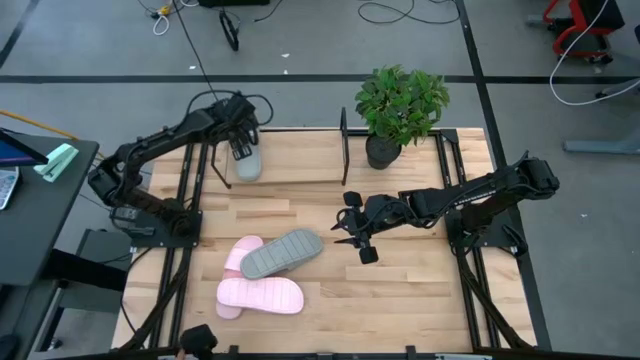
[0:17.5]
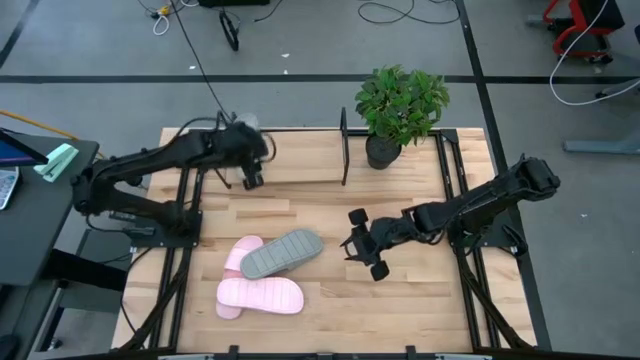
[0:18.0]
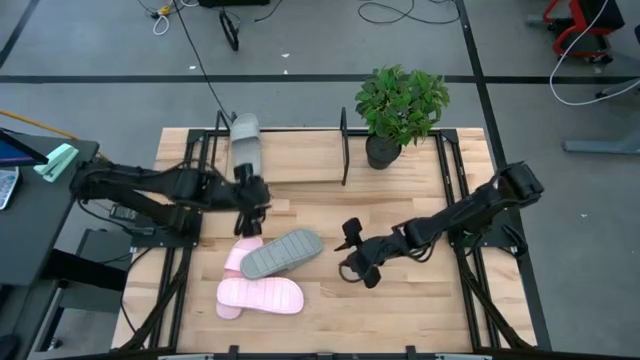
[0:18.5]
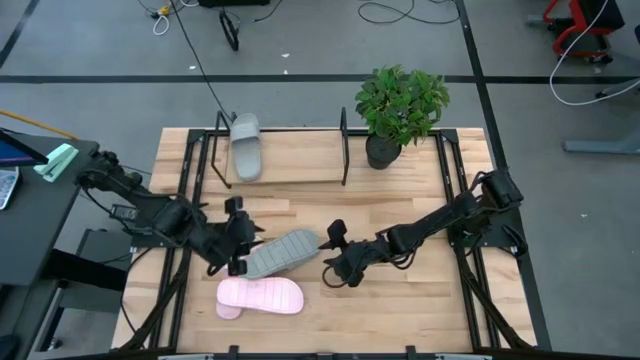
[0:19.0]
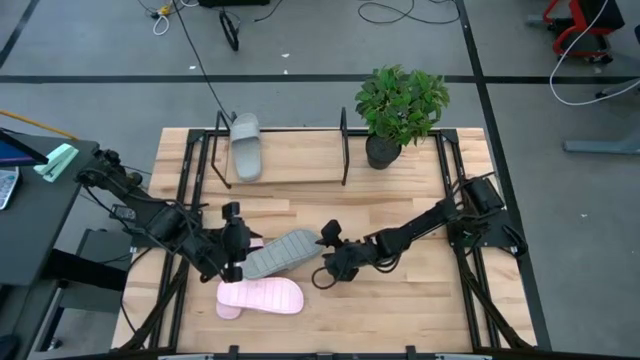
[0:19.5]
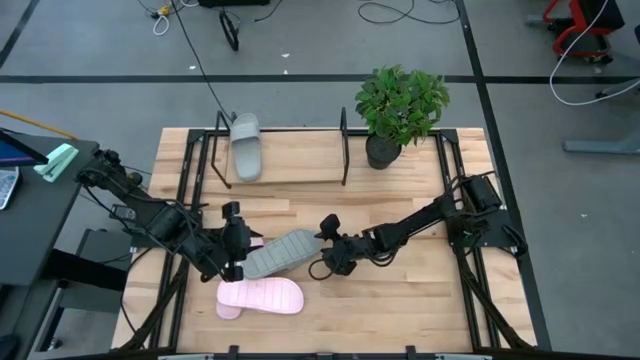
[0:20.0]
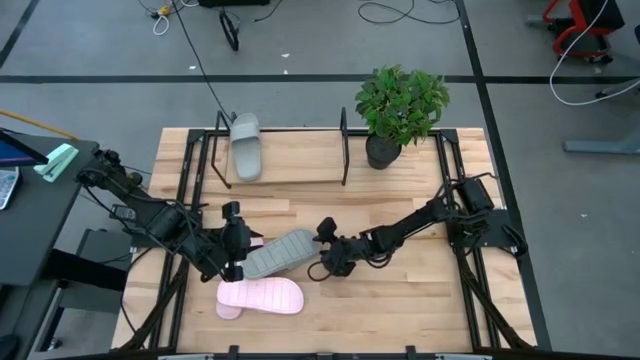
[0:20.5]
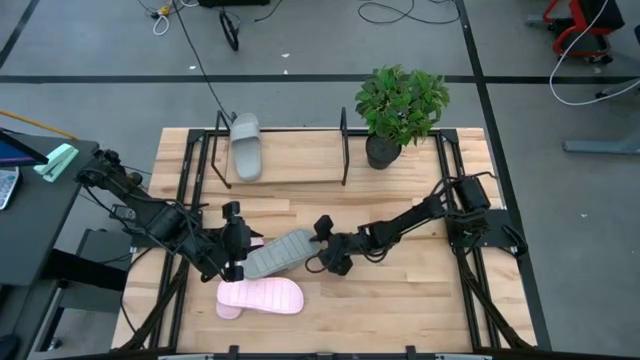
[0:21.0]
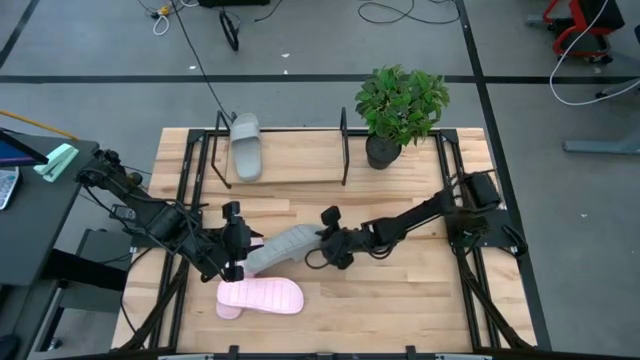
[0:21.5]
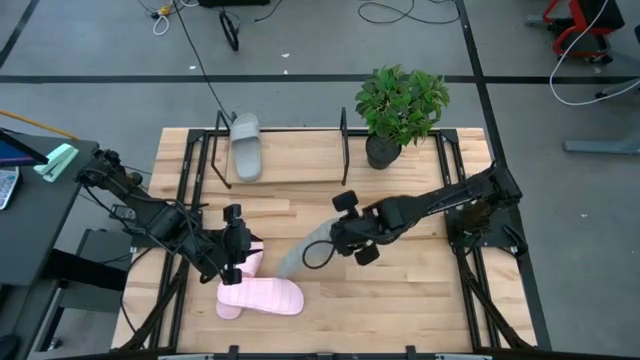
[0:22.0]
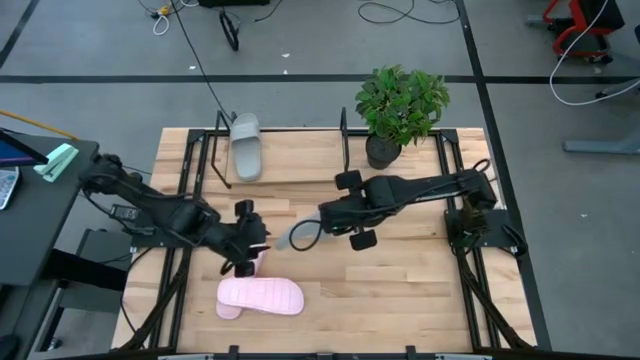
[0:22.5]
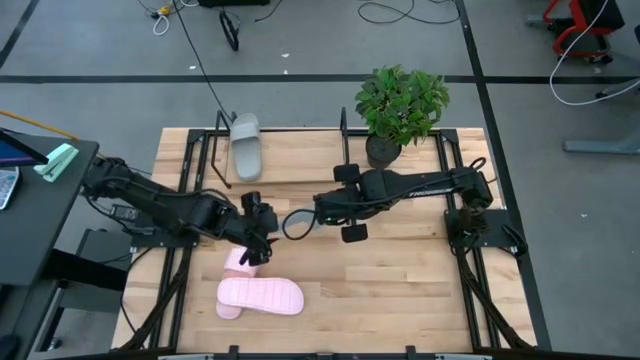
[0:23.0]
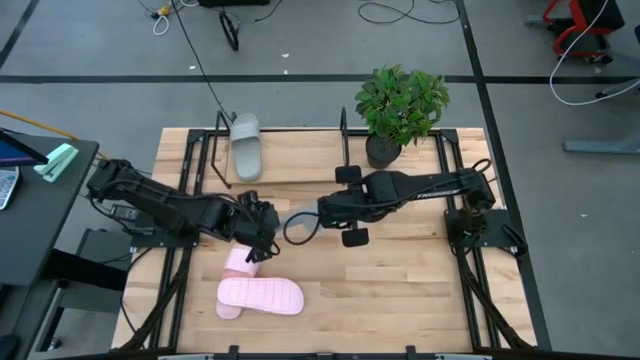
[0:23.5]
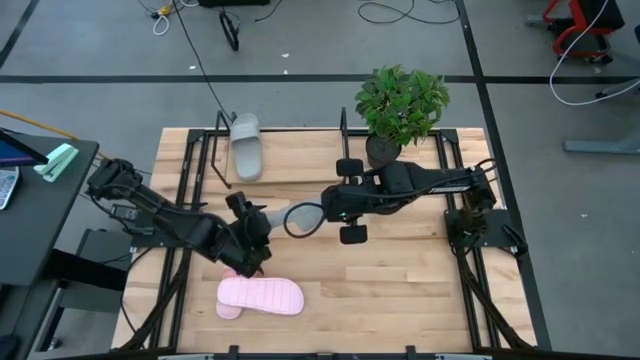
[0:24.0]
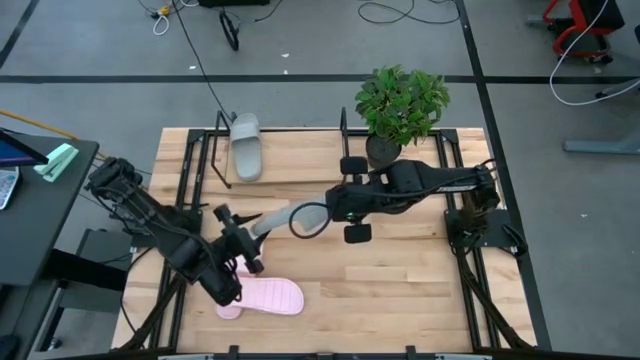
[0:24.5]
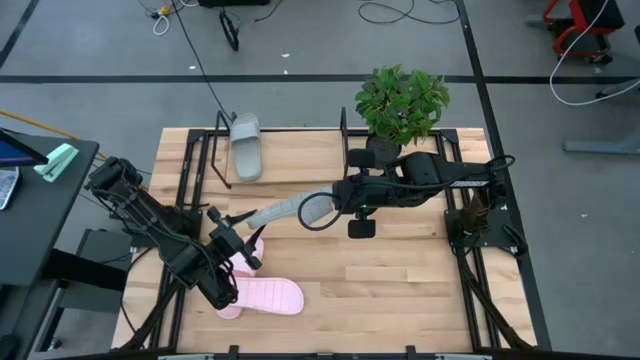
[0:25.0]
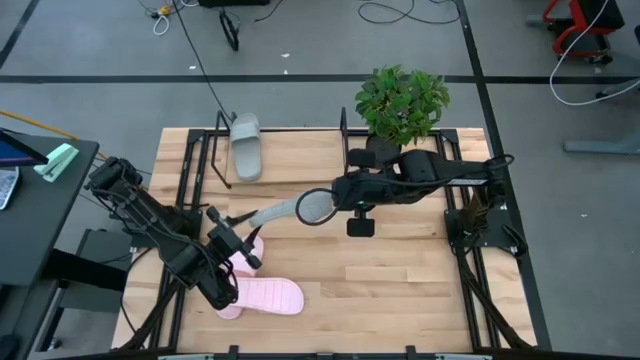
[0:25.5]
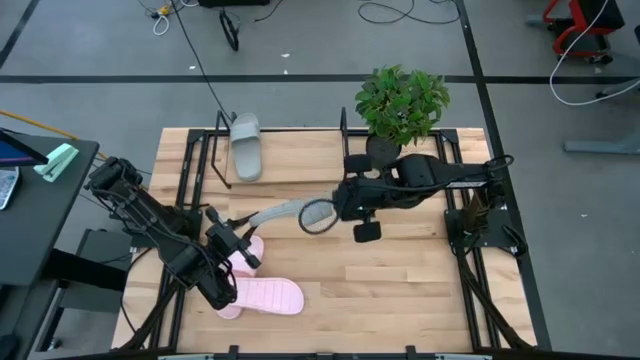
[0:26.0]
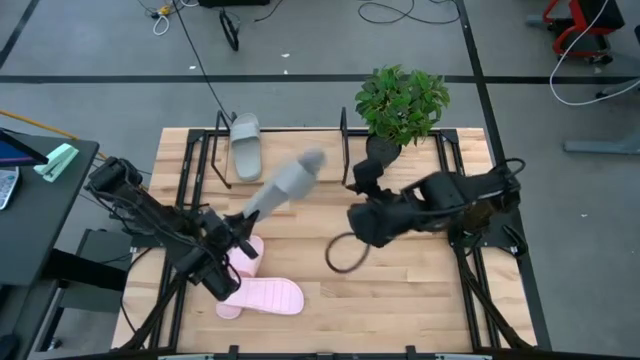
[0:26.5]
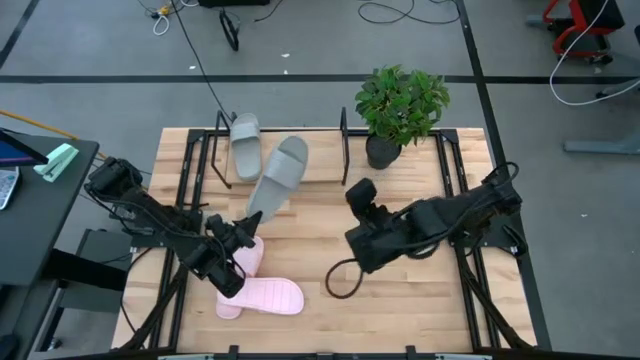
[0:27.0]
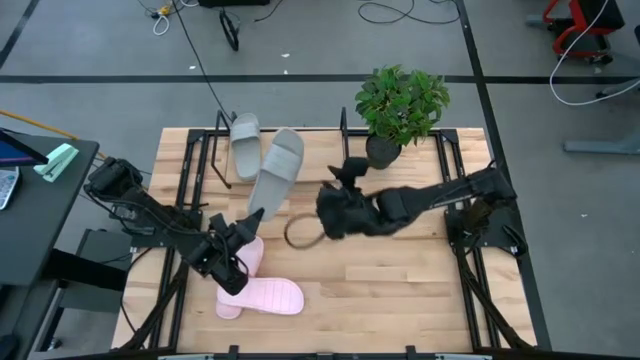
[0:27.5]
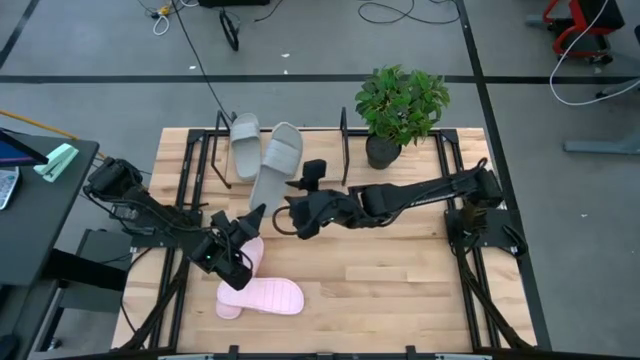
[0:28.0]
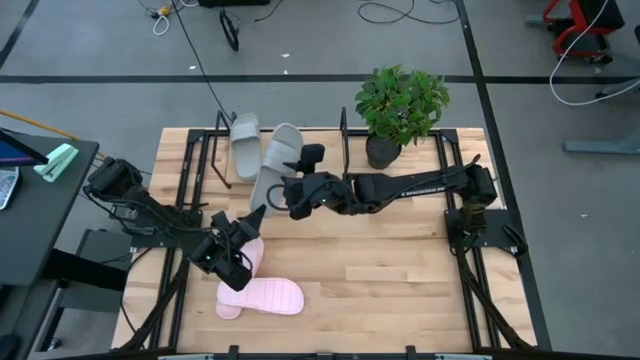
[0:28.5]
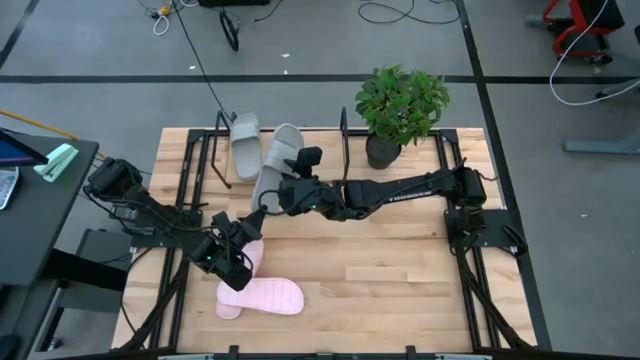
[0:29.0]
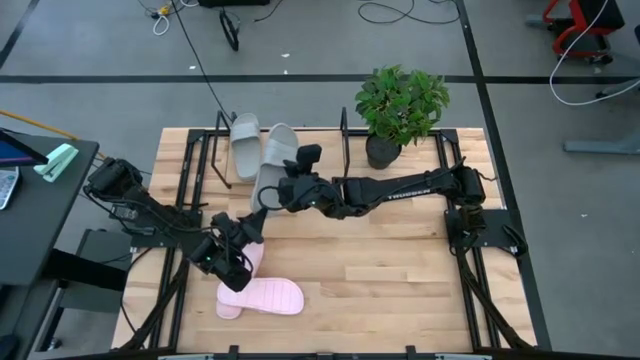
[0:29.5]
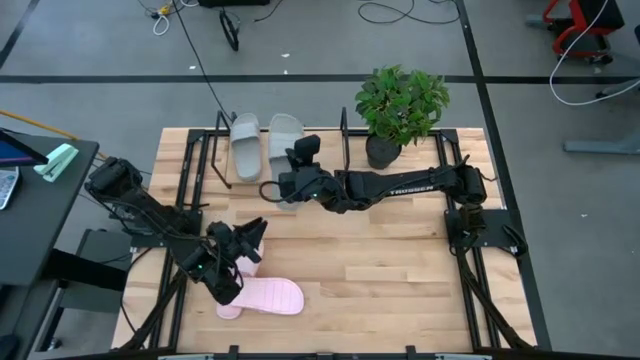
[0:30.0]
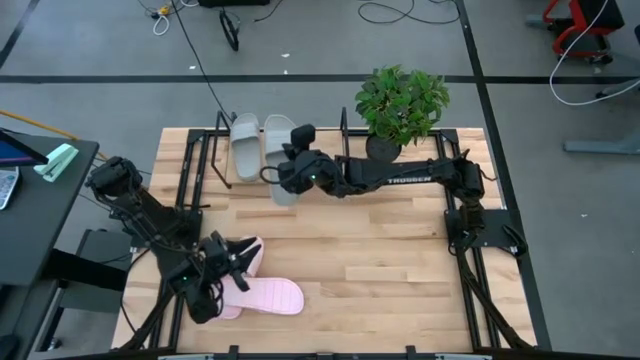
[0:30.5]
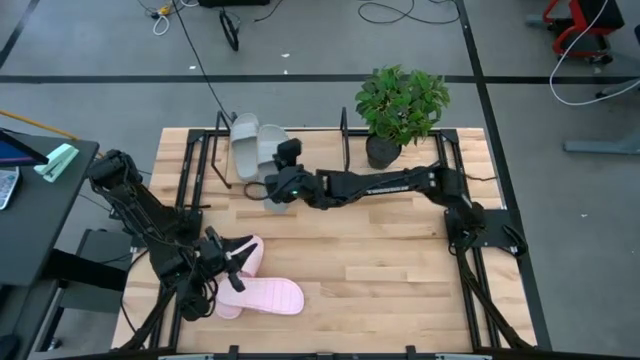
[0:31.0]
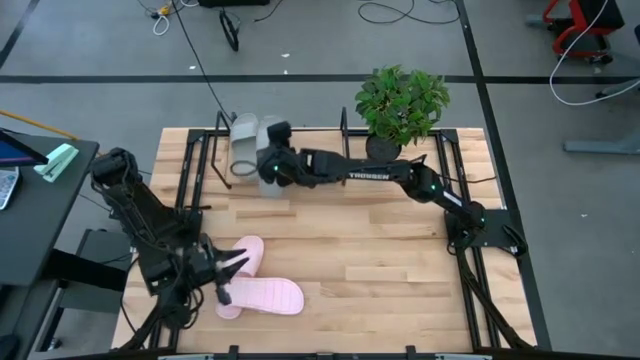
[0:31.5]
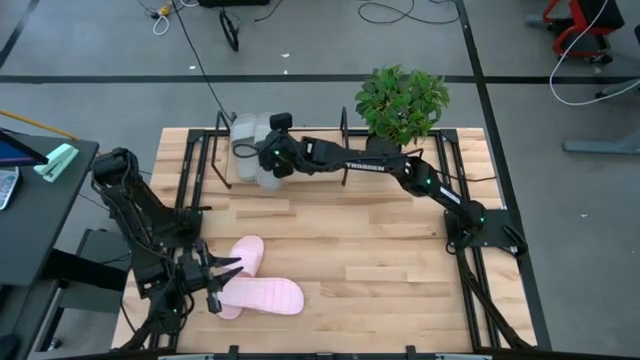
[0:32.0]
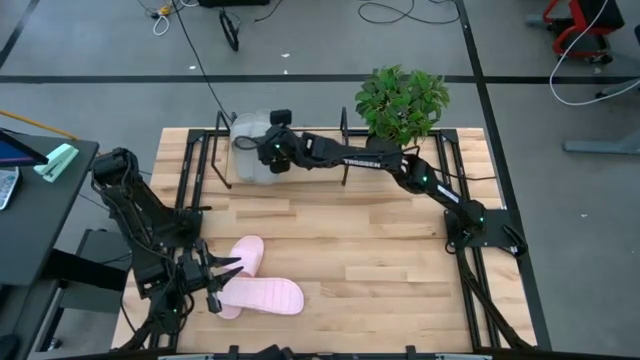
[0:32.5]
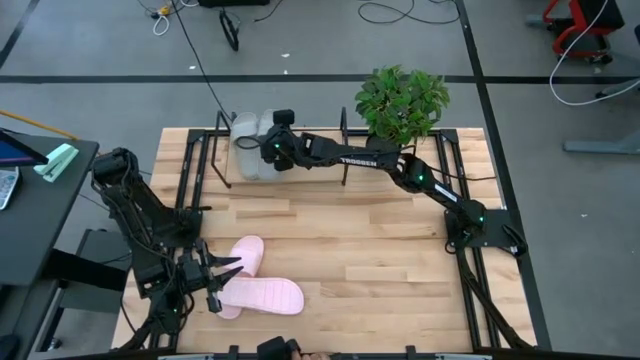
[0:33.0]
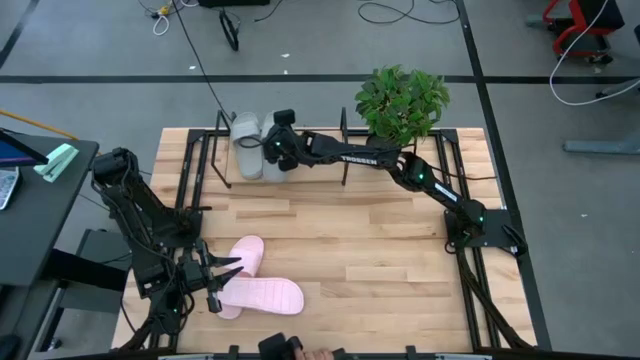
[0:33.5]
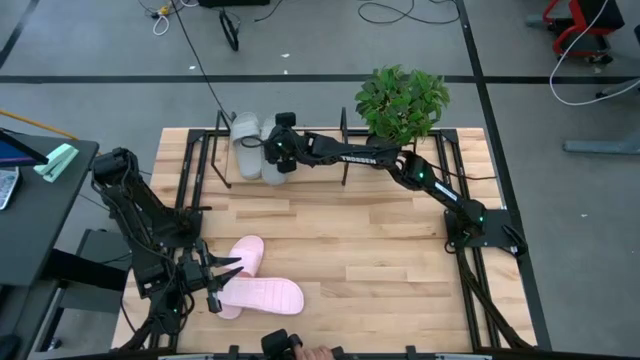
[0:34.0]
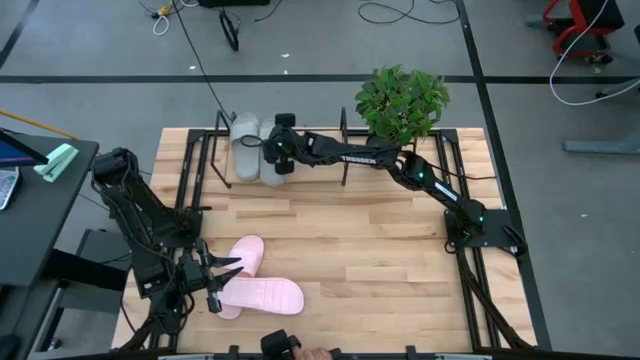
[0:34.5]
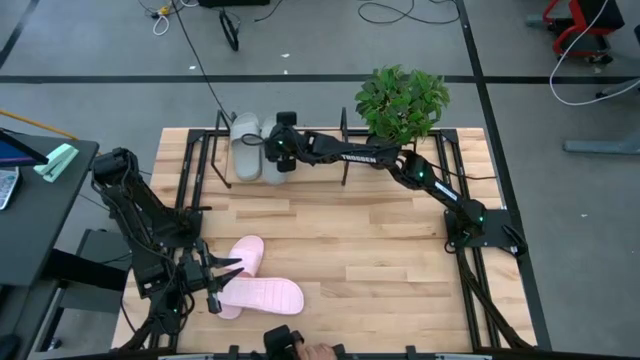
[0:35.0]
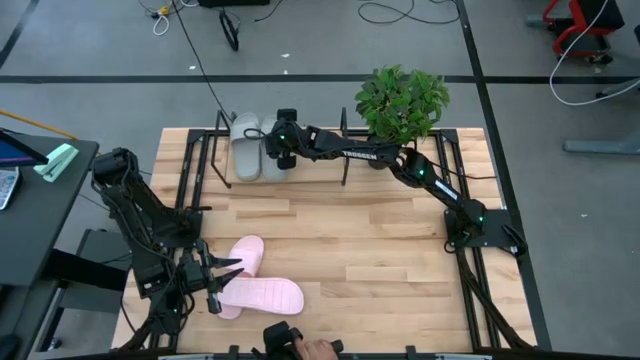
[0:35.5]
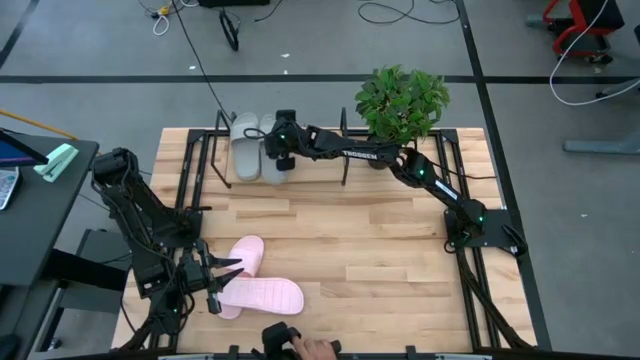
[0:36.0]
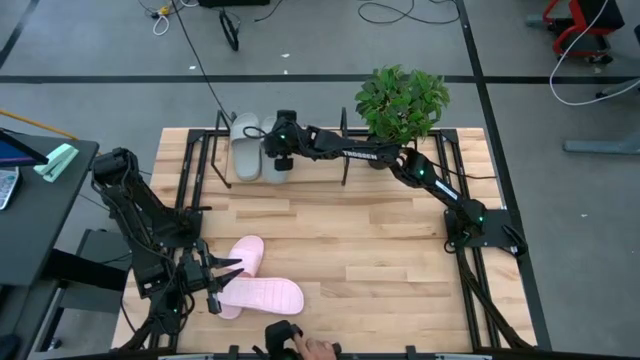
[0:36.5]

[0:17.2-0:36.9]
Task: Pick and place slides into the shelf
Put the gray slipper on the shelf

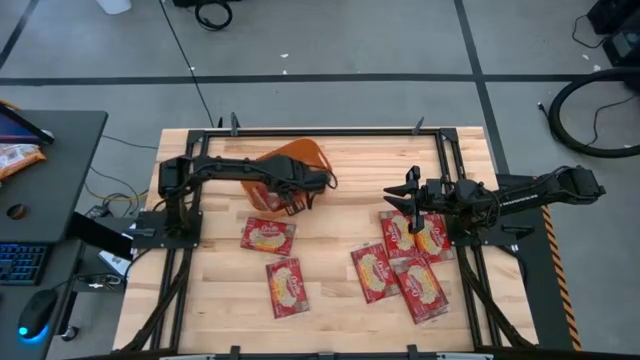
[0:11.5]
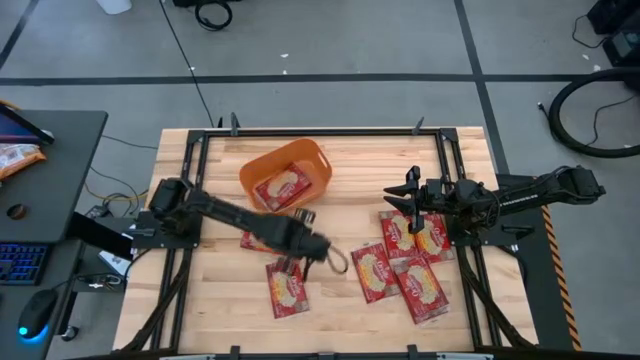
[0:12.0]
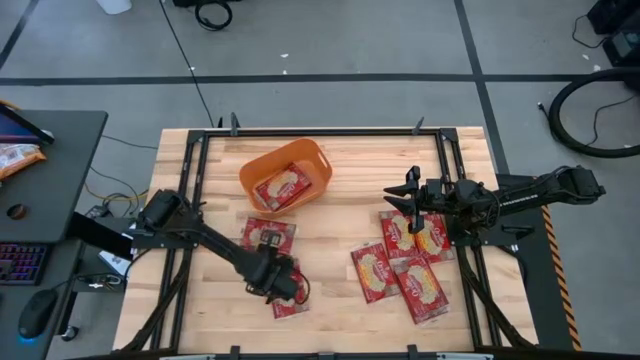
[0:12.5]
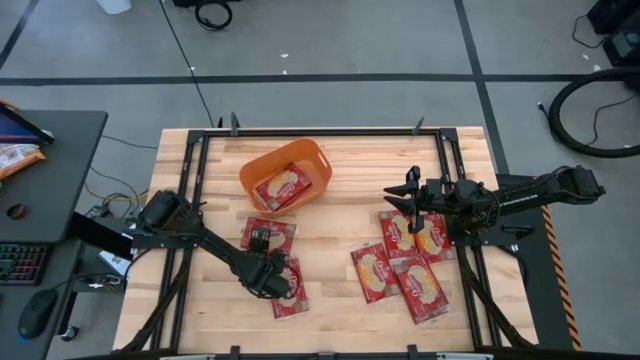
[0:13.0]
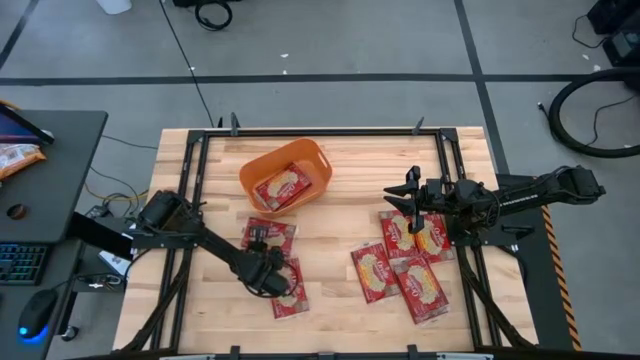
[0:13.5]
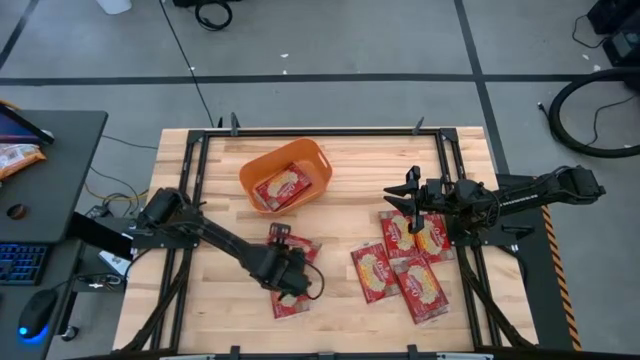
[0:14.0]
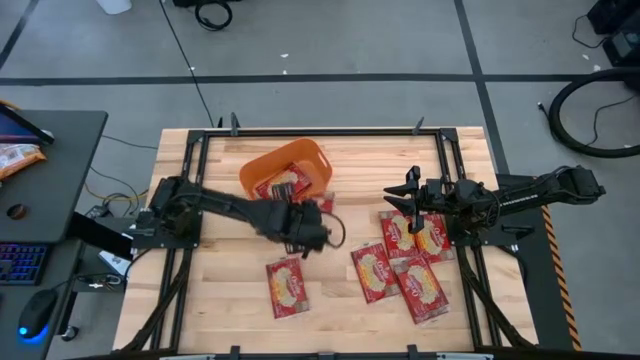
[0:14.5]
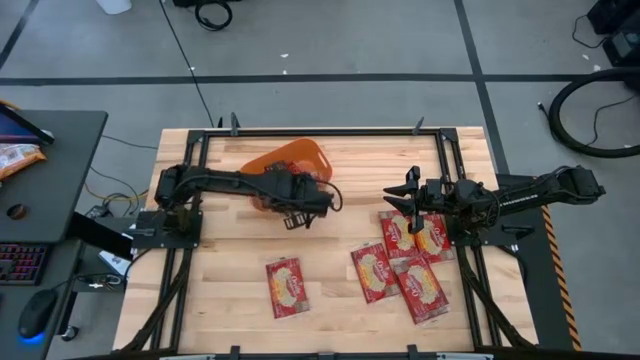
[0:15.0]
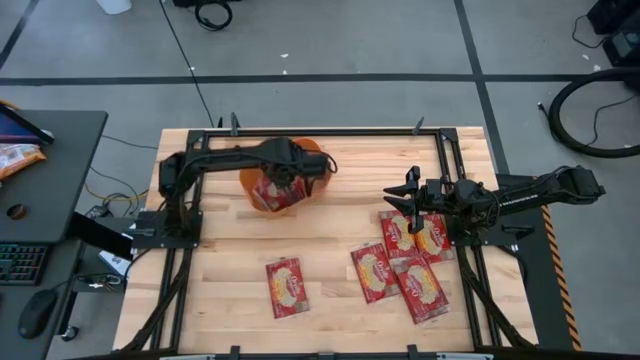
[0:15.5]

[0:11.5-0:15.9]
Task: Sort popcorn bags into baskets
Put the red popcorn bag into the orange bin
